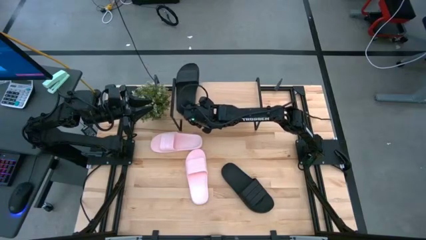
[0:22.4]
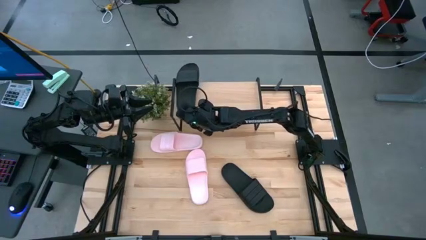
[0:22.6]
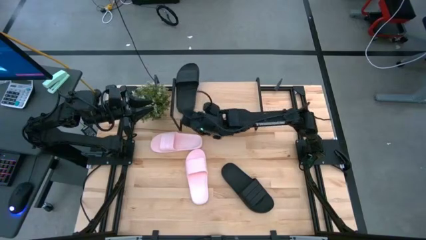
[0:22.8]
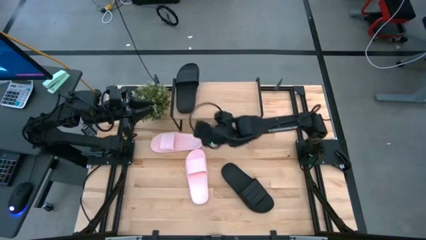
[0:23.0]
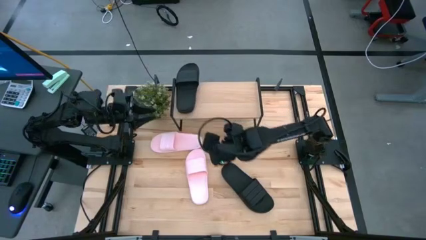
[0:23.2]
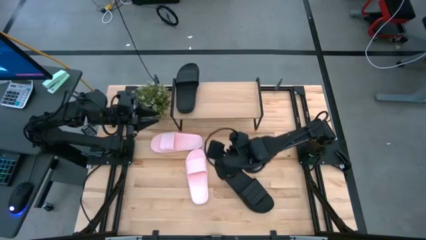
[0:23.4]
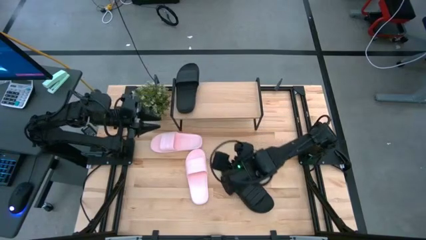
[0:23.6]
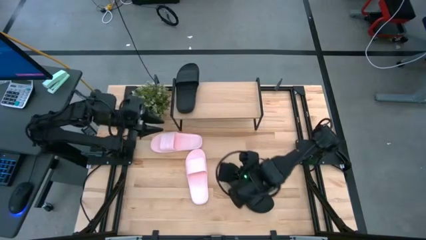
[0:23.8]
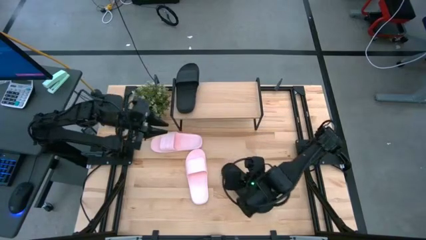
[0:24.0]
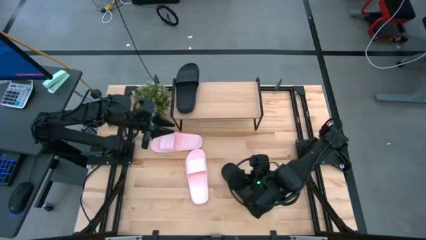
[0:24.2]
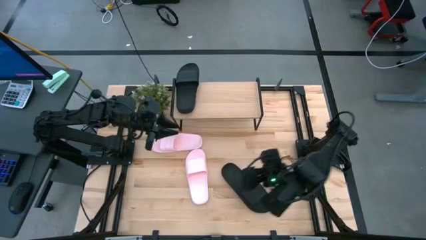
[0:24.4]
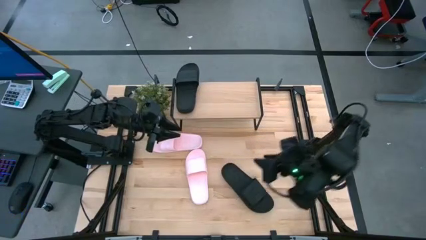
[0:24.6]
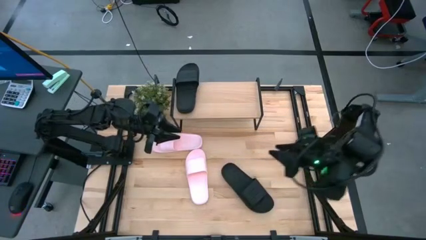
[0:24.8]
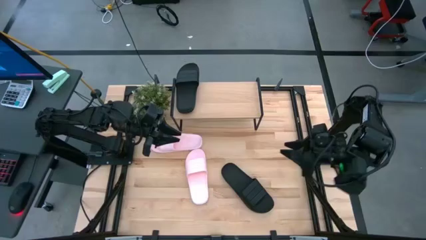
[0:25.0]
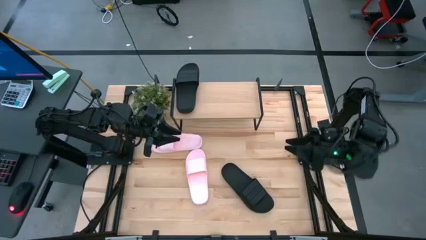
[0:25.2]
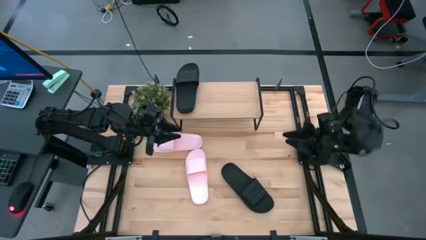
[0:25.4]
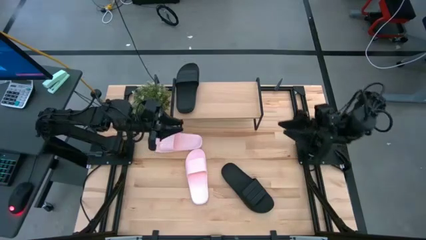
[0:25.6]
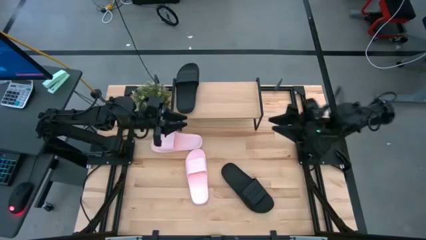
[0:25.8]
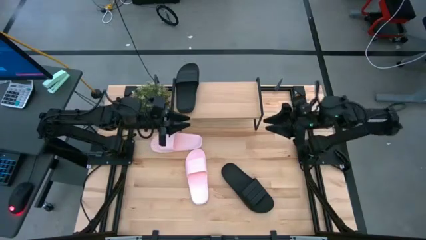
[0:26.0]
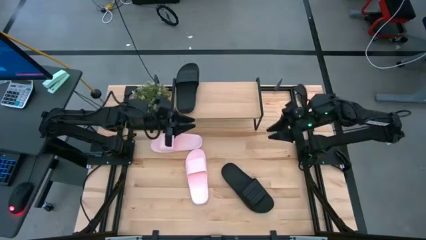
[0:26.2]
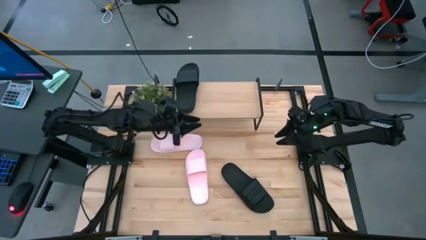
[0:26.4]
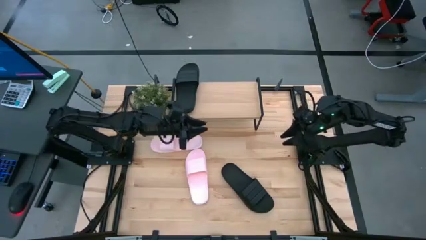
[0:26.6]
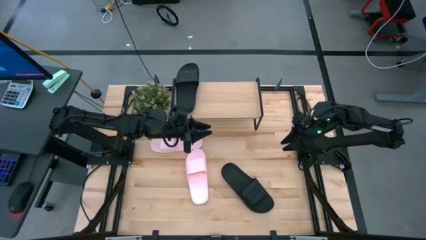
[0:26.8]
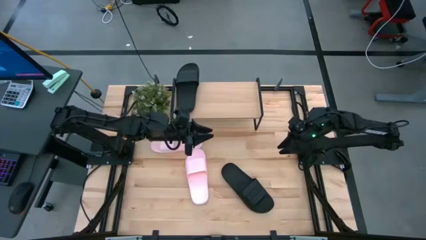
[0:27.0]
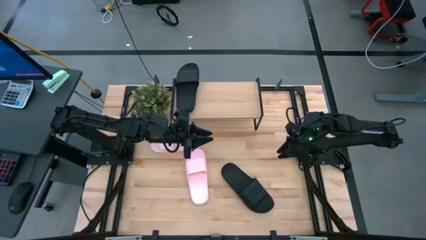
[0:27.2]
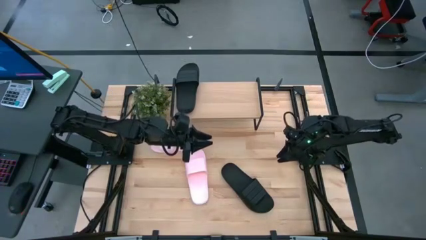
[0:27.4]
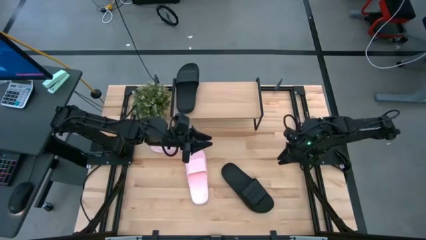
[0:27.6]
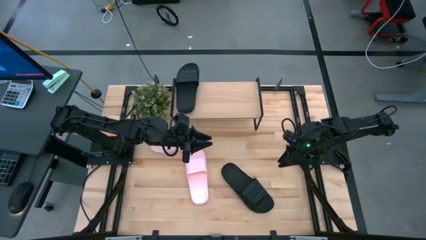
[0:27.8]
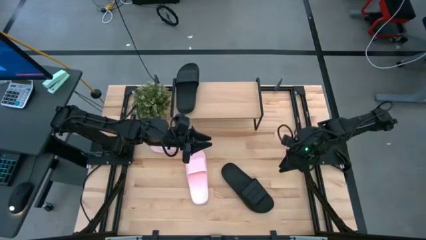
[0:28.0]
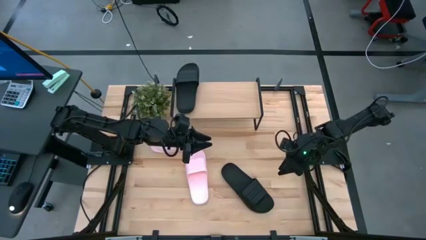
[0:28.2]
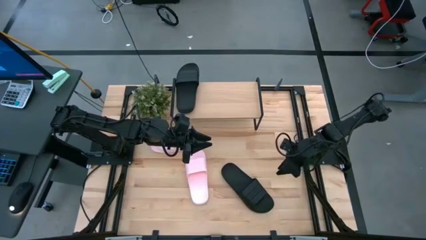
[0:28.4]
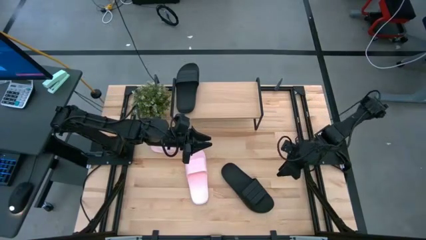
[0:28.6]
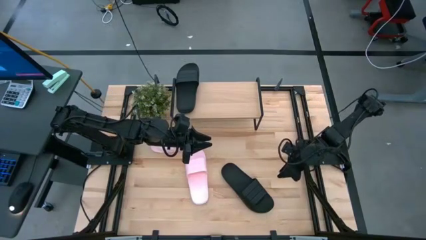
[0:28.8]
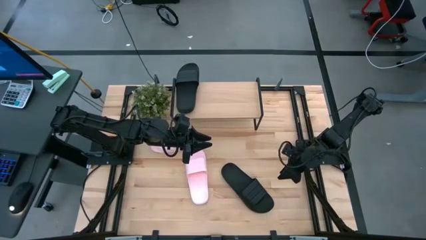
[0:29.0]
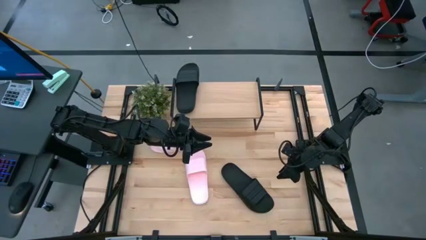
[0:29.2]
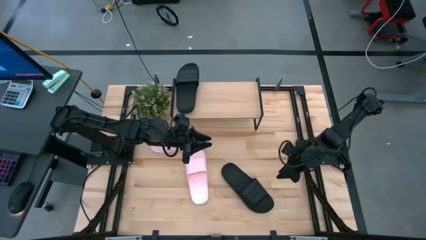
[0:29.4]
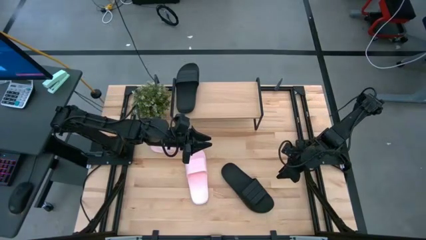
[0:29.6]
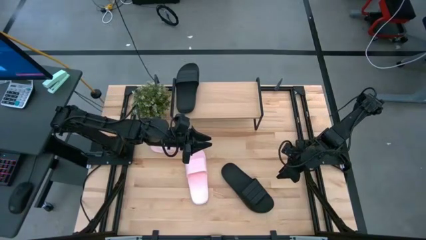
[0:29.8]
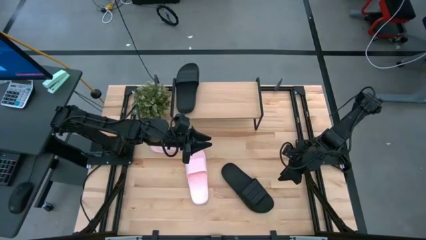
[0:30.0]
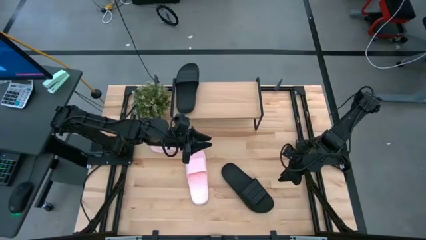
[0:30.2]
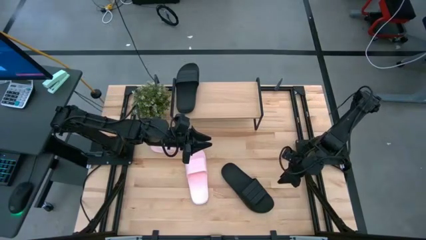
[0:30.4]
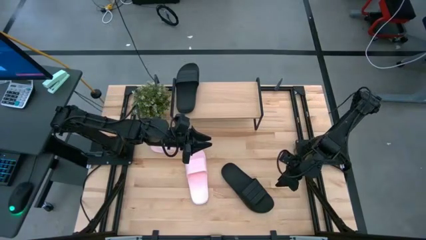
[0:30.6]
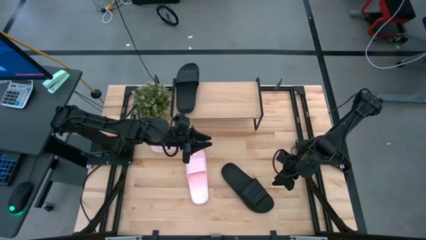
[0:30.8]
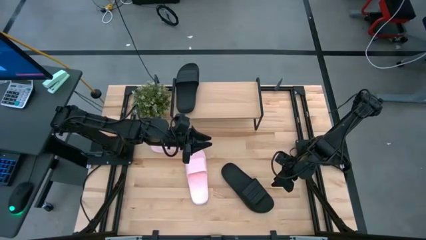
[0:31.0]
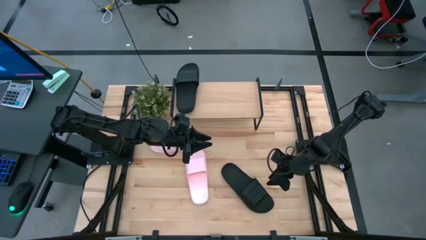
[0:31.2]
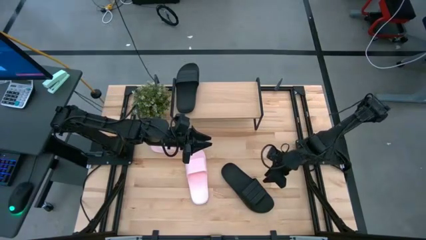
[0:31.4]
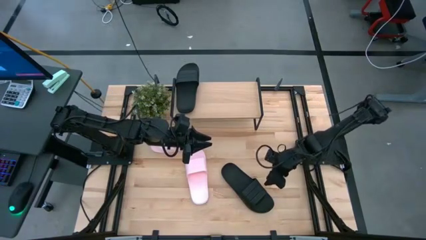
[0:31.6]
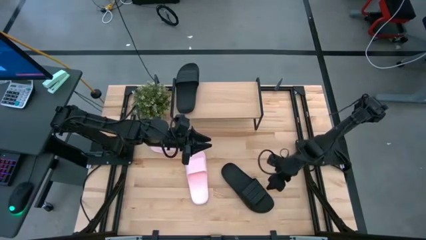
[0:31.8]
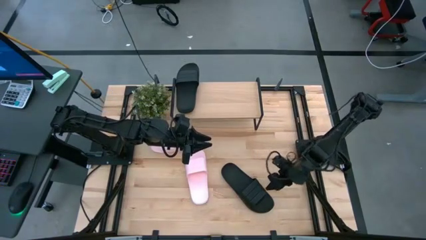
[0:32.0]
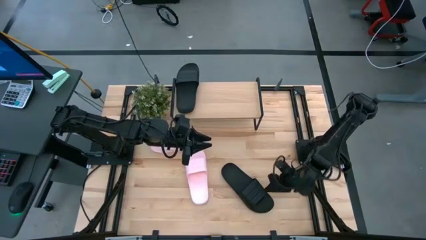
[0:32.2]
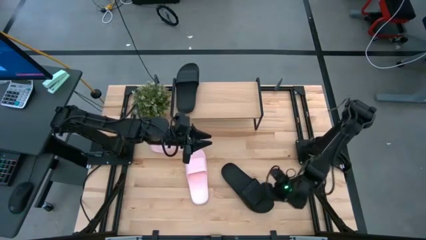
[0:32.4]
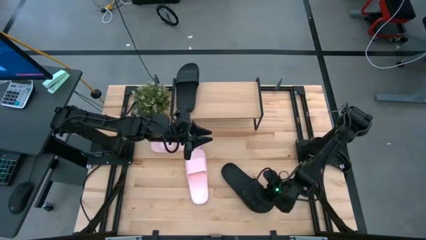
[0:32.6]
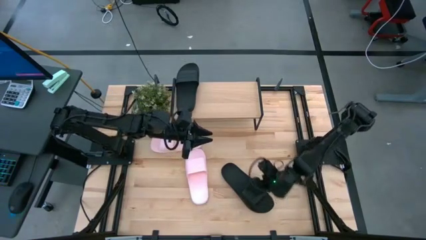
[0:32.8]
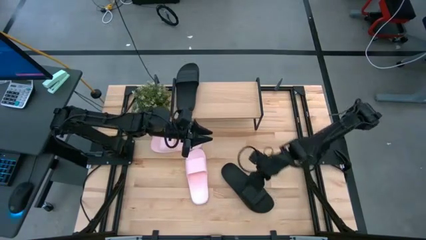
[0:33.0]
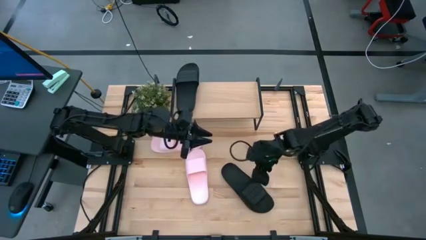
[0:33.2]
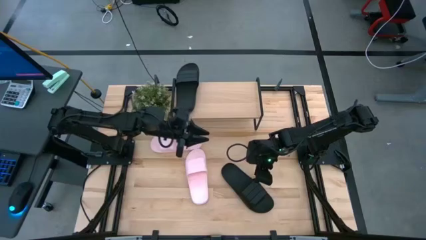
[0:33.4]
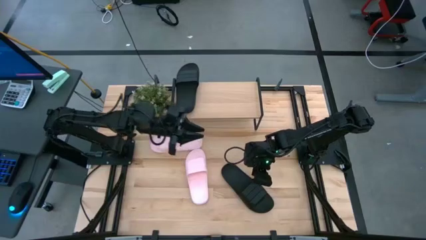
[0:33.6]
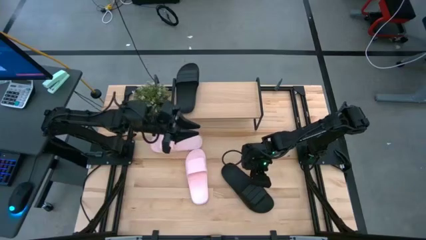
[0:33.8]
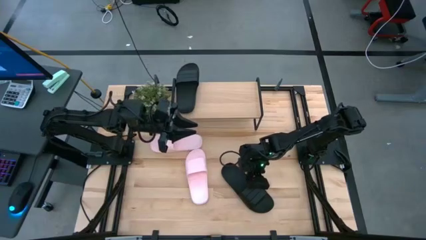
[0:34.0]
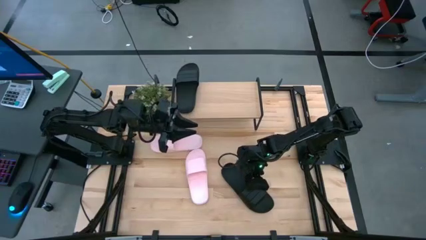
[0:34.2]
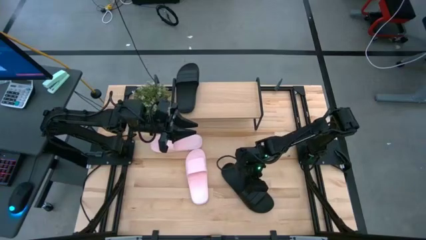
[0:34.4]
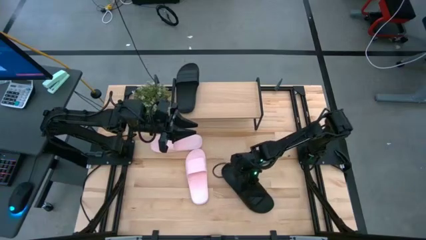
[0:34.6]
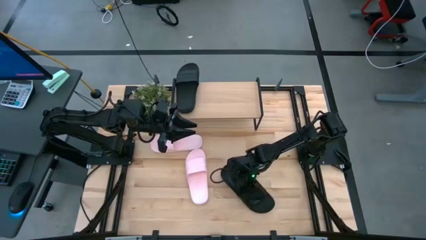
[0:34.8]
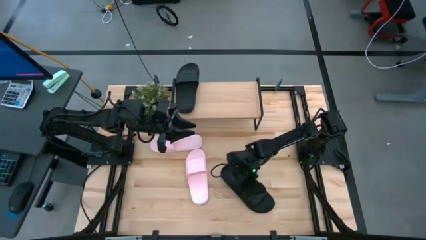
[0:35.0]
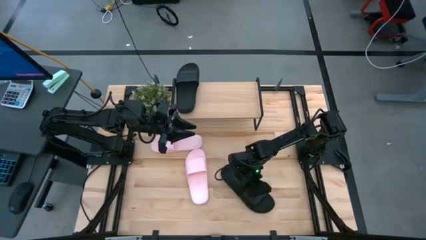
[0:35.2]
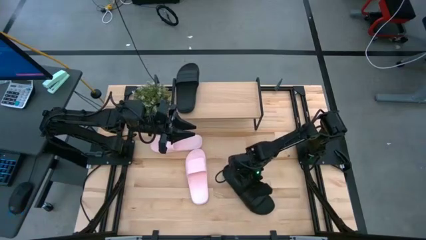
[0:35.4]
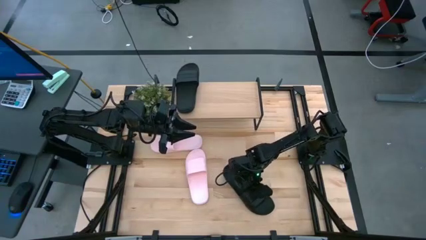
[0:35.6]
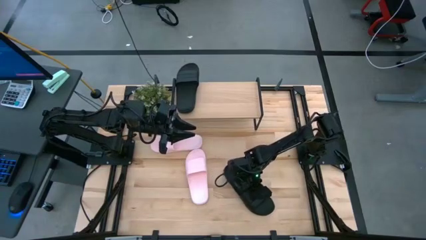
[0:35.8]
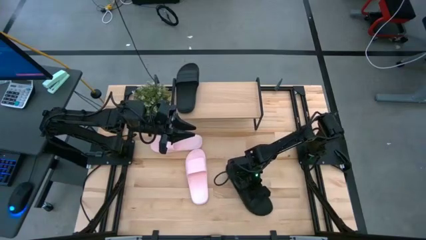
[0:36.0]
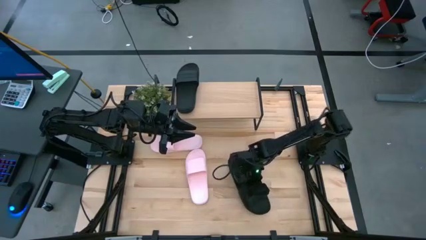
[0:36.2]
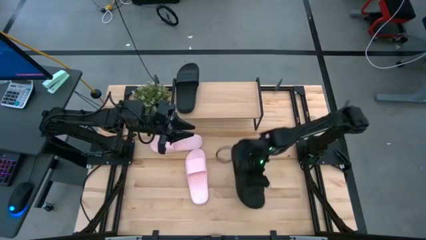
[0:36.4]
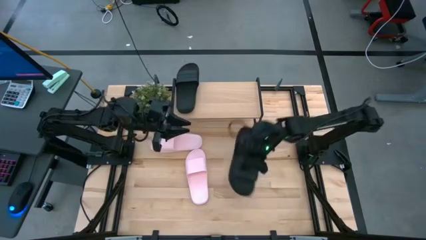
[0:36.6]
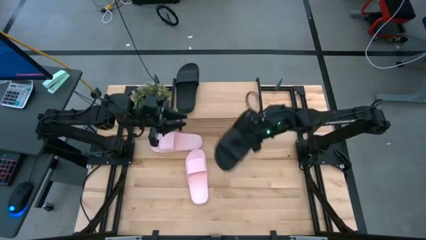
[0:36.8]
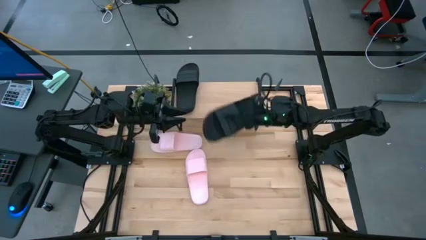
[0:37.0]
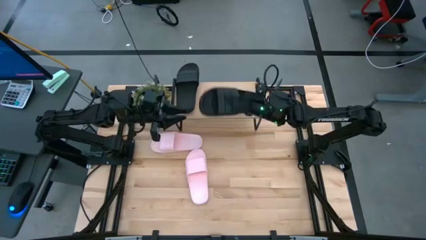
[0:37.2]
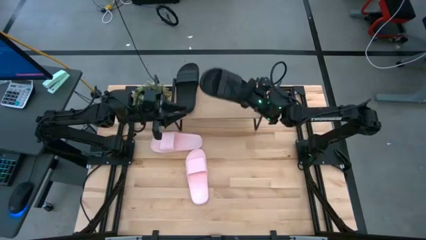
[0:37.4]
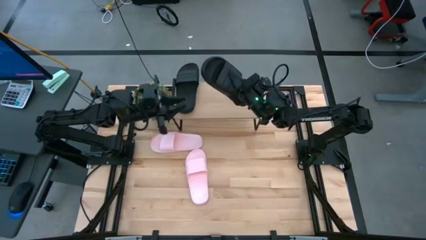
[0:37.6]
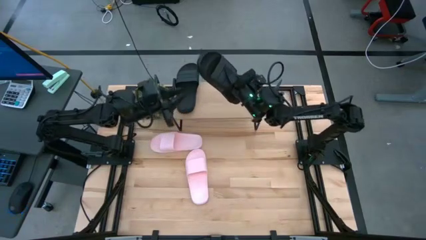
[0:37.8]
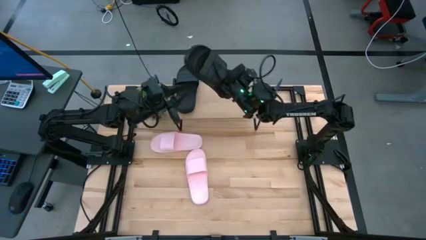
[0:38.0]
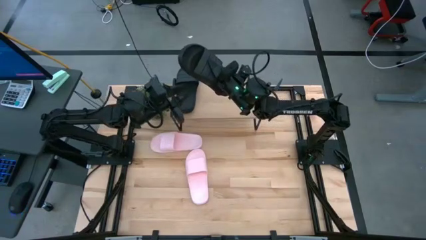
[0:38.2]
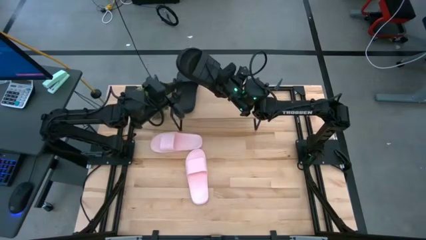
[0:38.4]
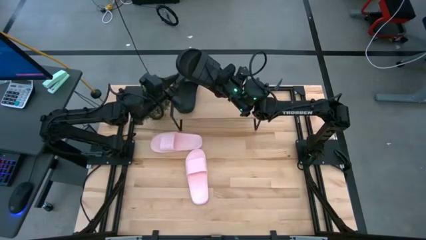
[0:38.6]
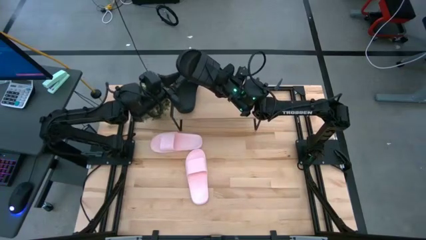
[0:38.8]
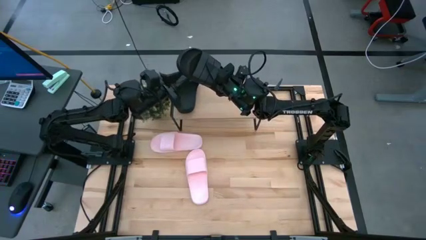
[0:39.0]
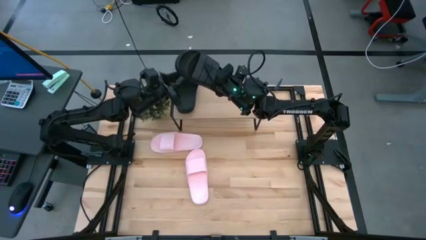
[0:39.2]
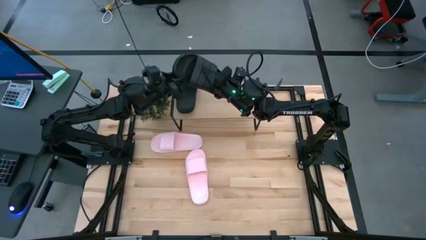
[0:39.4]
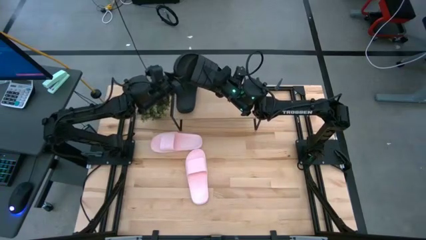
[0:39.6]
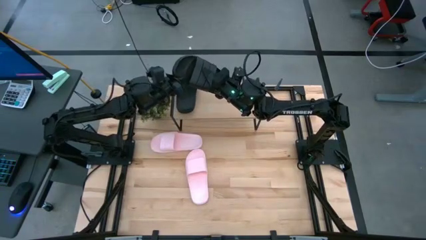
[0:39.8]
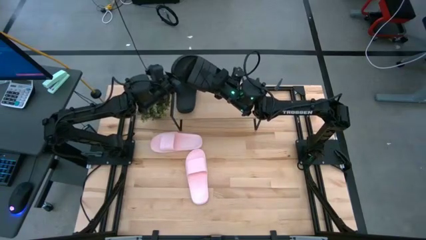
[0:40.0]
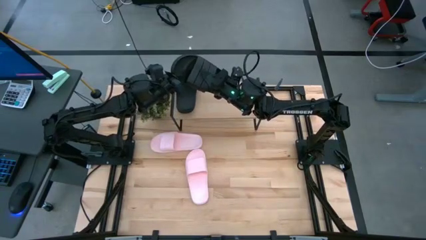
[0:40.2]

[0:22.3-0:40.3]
Task: Pick and place slides into the shelf
Put the black slide on the shelf
